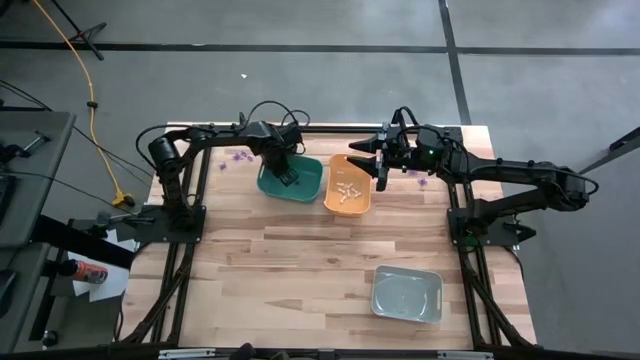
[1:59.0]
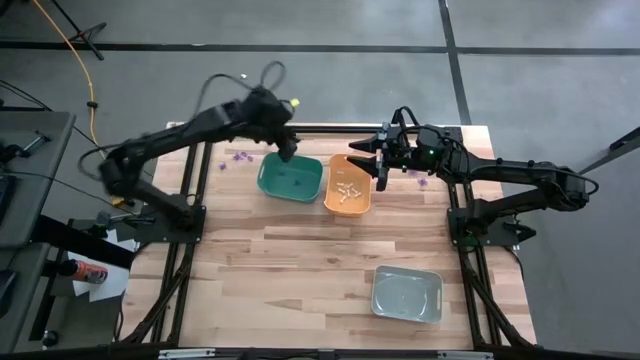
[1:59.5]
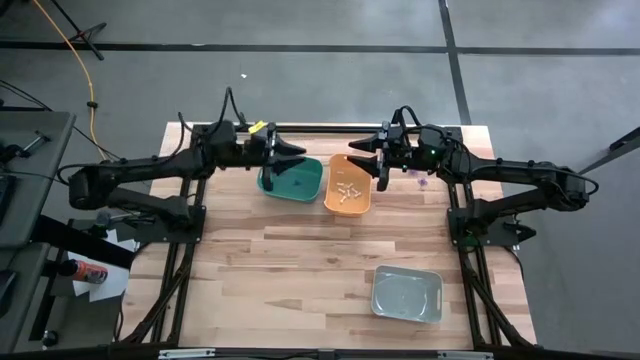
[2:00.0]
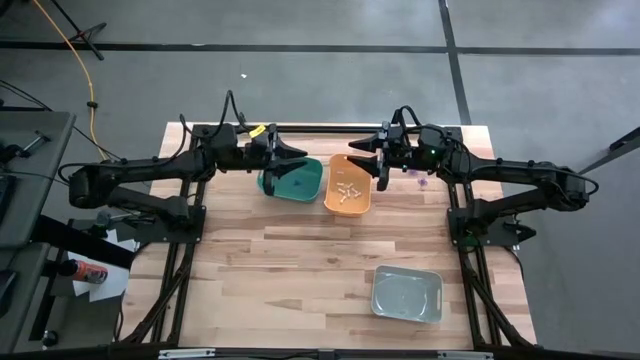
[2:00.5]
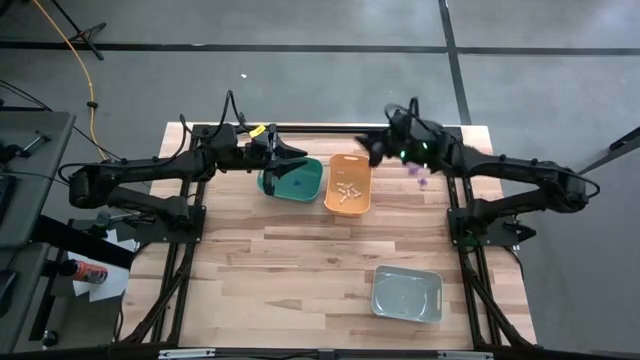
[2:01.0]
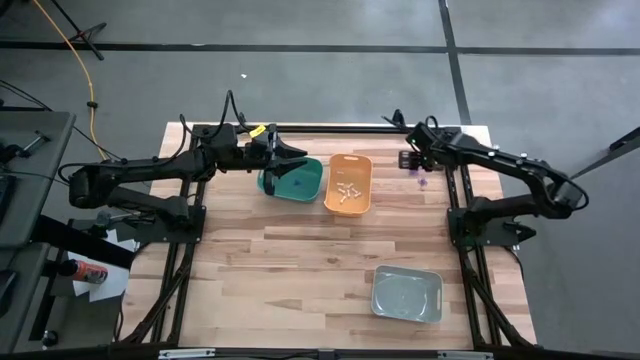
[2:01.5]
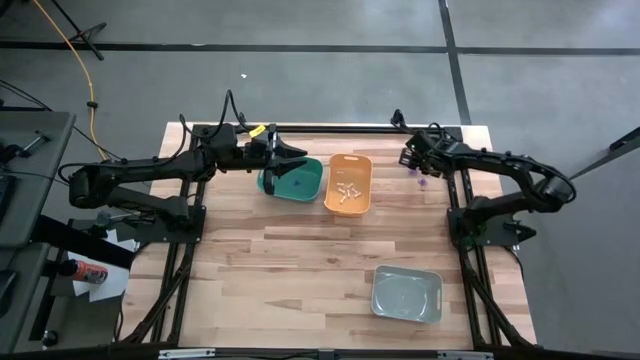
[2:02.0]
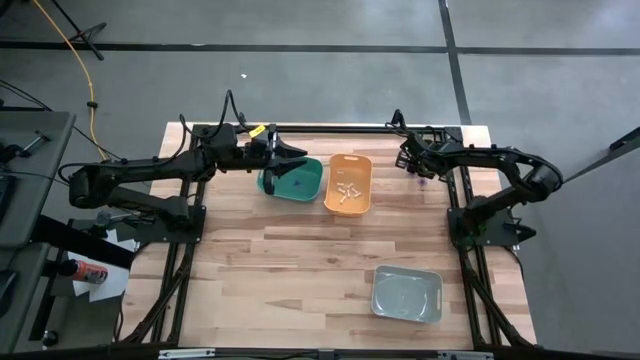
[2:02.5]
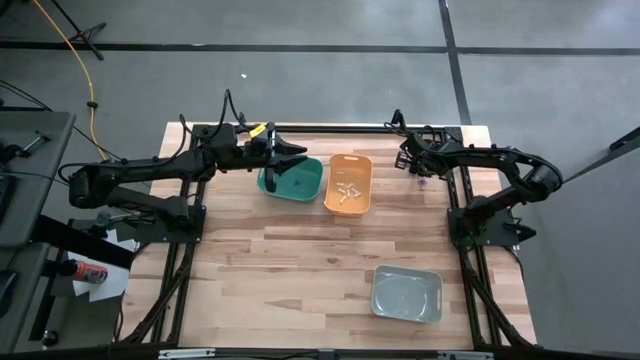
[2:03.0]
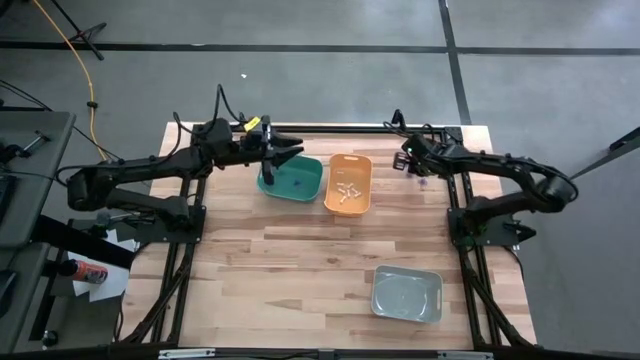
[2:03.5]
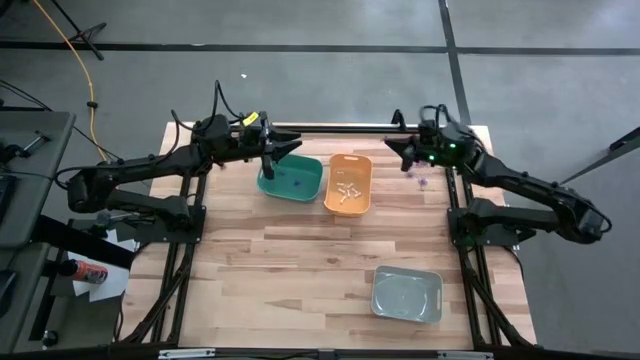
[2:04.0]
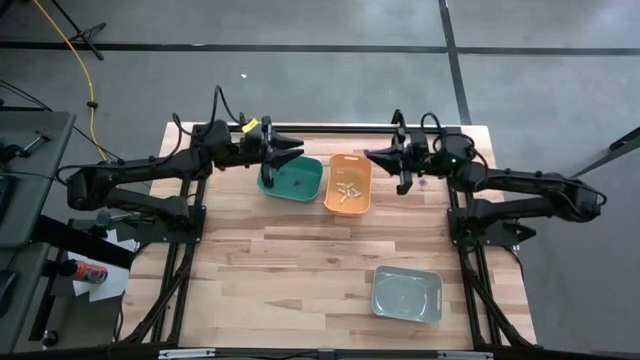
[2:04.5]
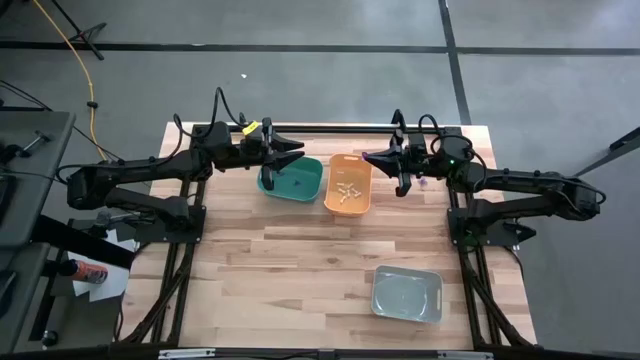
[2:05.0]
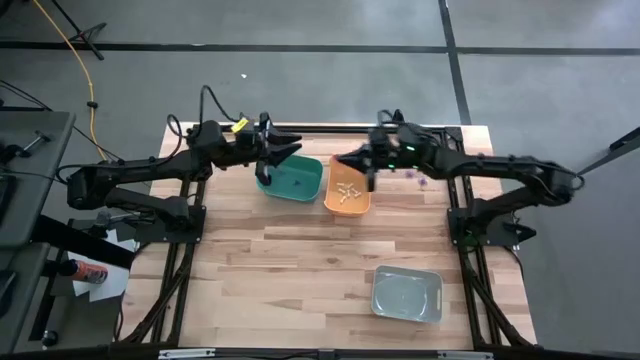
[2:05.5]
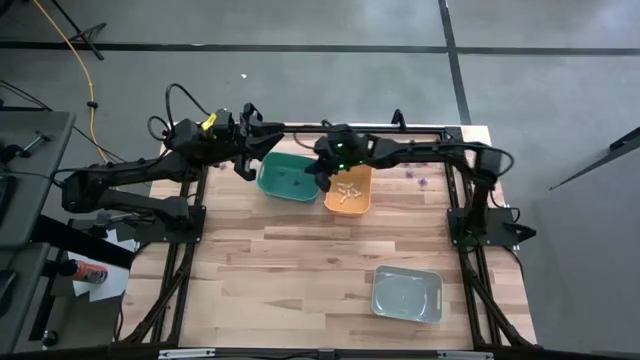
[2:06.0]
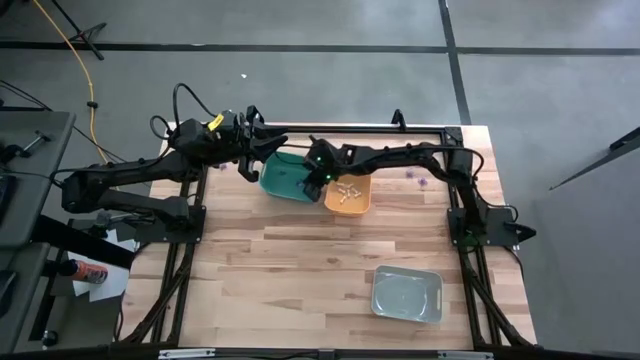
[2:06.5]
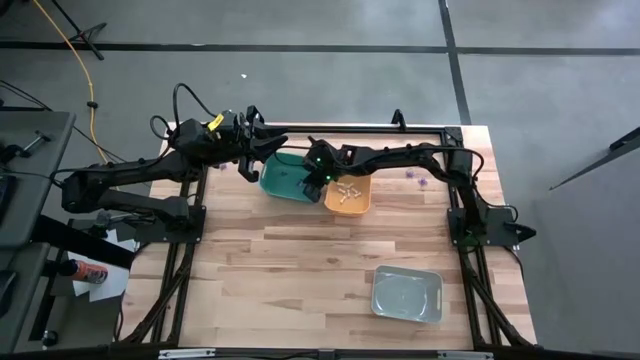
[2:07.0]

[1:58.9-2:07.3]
Task: Sort Halloween decoration
Put the violet witch hut toy into the green bin

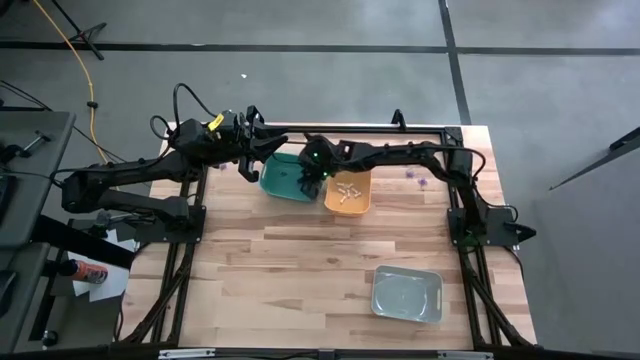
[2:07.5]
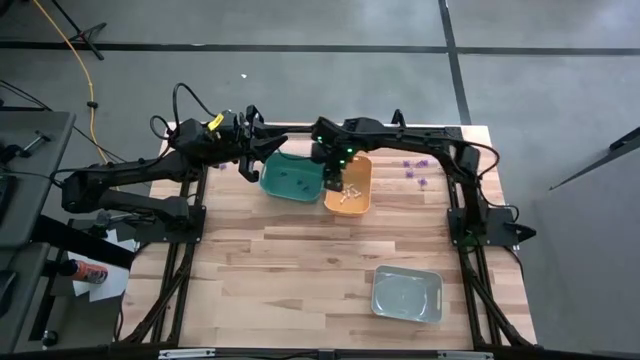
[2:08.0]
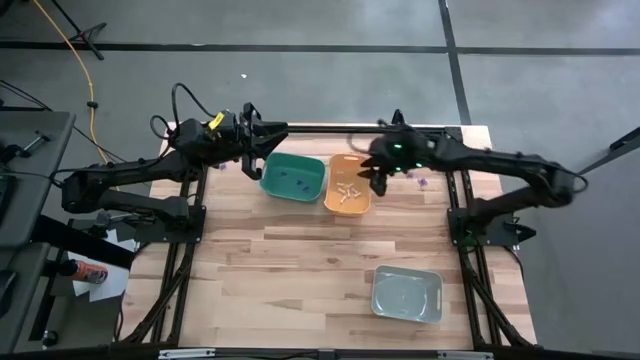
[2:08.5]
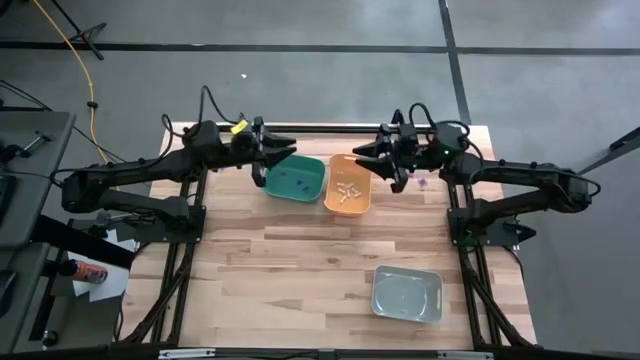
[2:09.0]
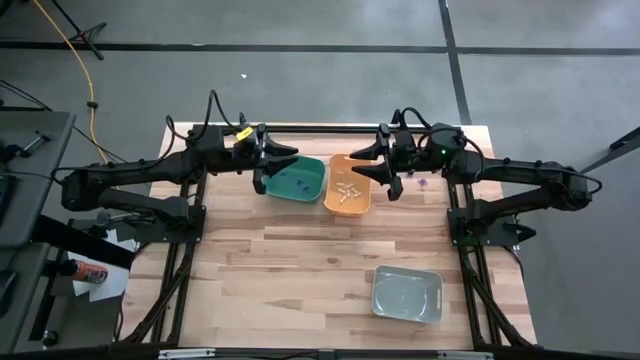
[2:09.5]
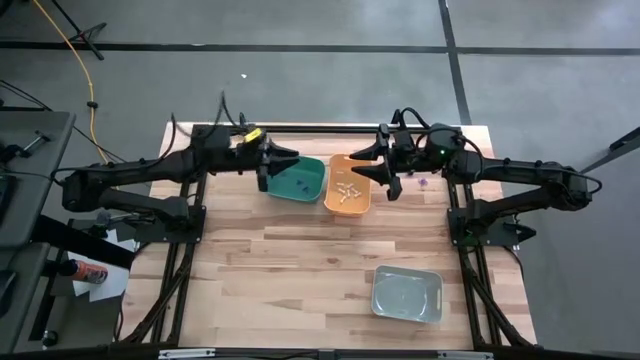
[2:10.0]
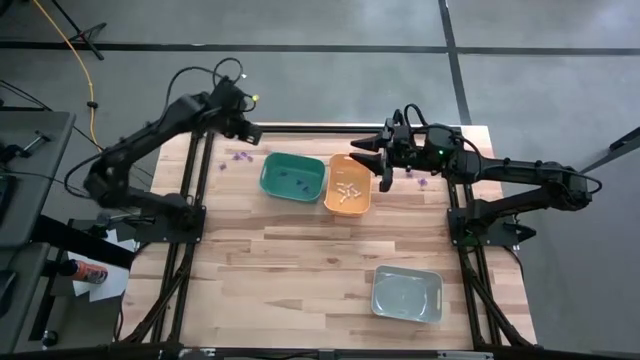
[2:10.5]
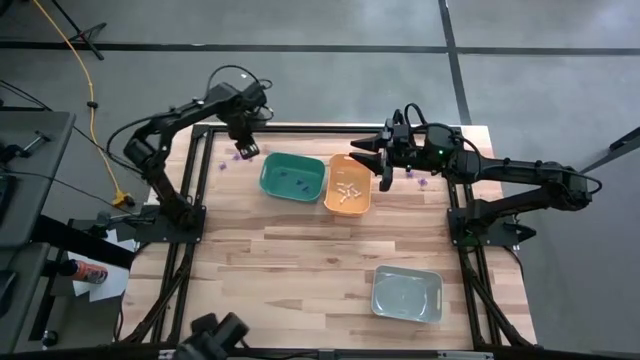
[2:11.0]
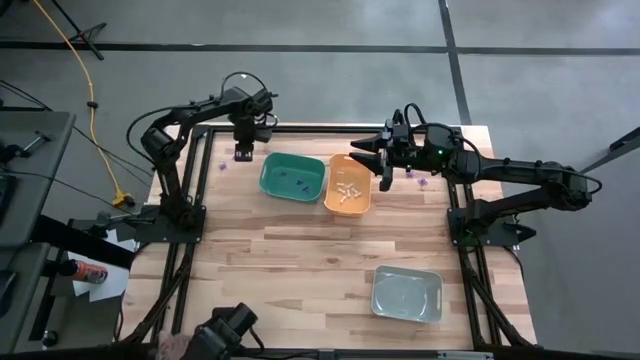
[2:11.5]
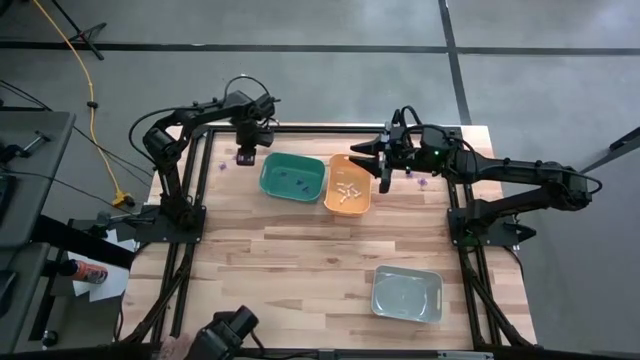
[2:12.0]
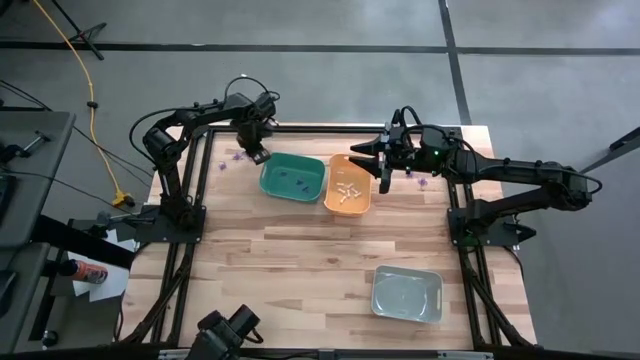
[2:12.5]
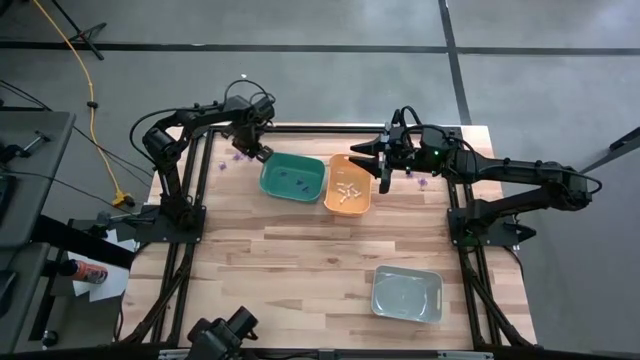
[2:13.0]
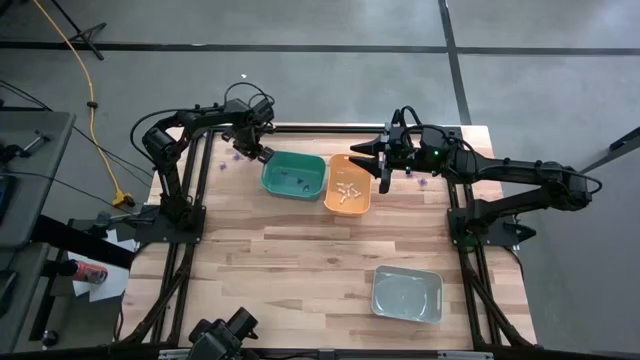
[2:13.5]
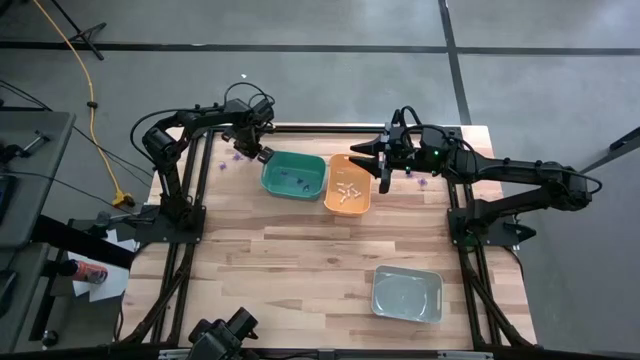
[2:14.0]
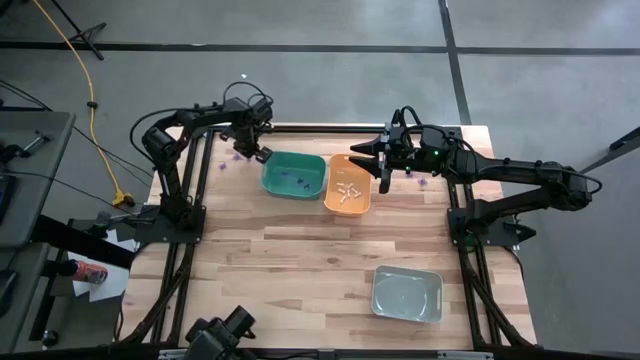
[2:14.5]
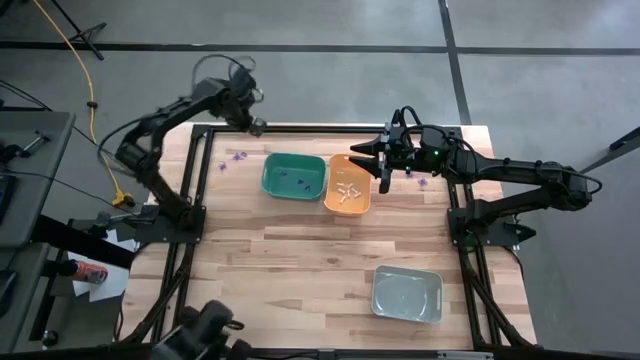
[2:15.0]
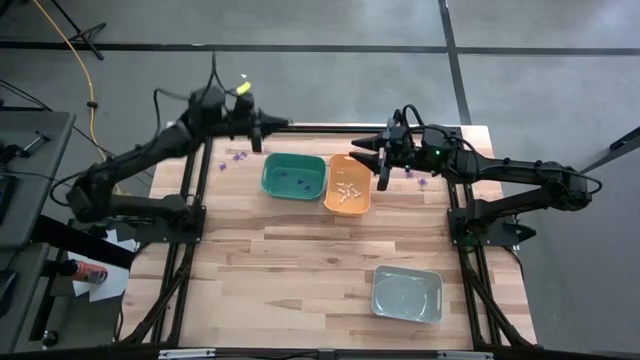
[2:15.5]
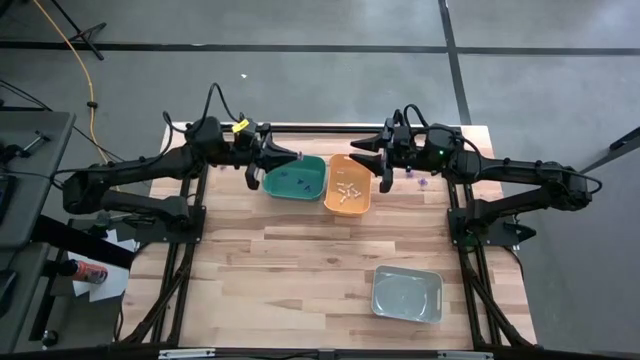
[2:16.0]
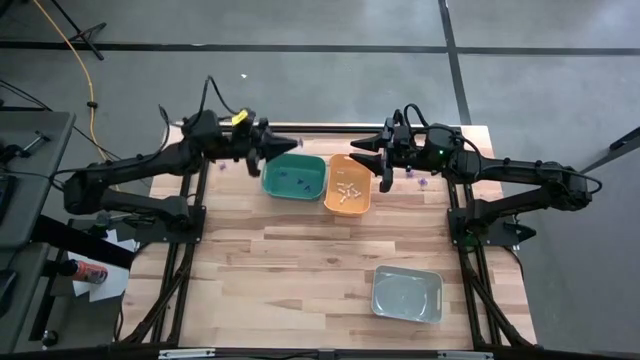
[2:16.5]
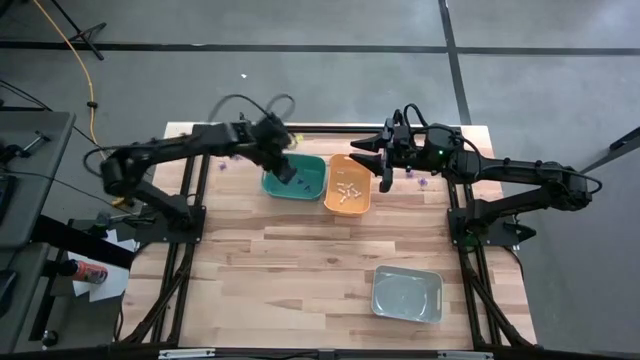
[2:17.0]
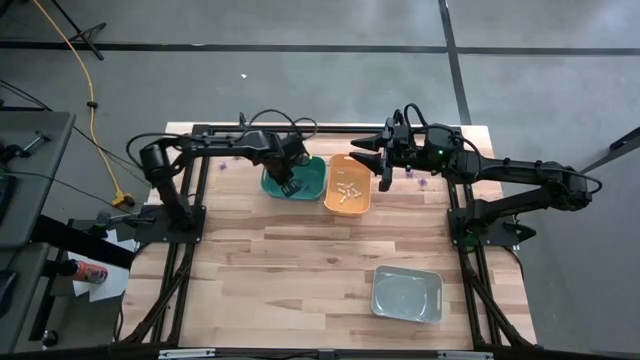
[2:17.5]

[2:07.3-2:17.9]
Put the violet witch hut toy into the green bin

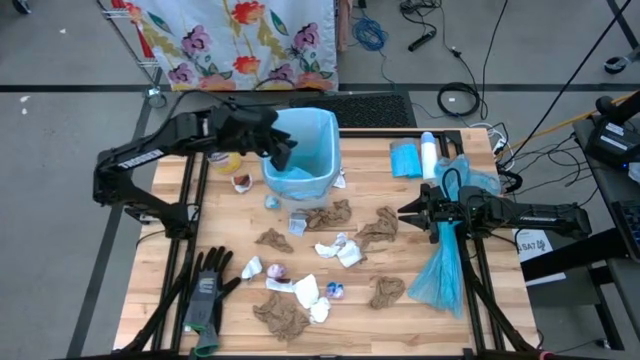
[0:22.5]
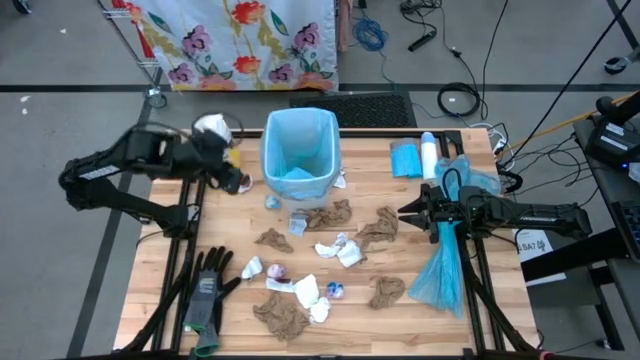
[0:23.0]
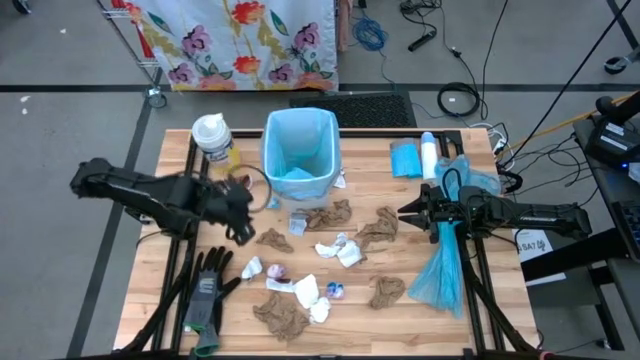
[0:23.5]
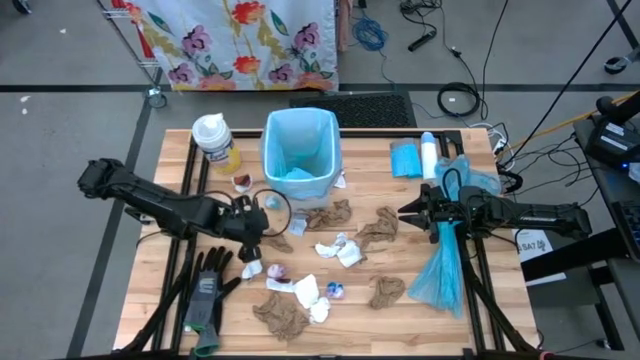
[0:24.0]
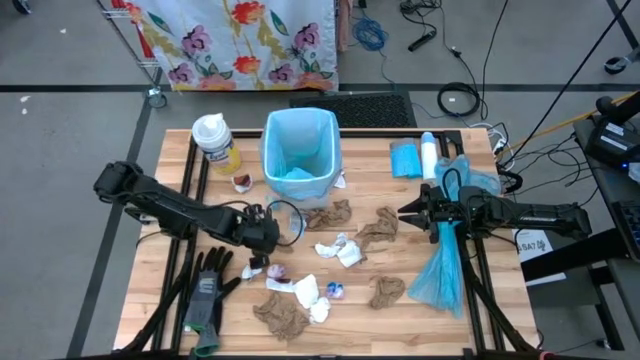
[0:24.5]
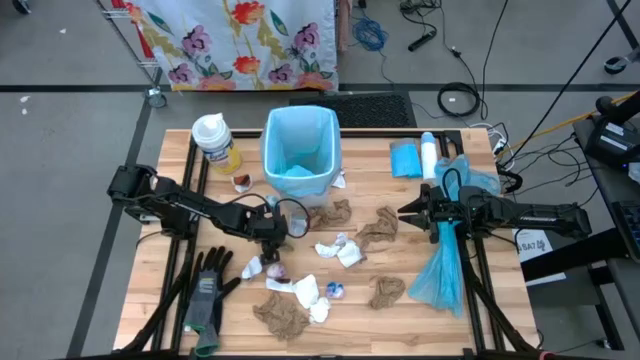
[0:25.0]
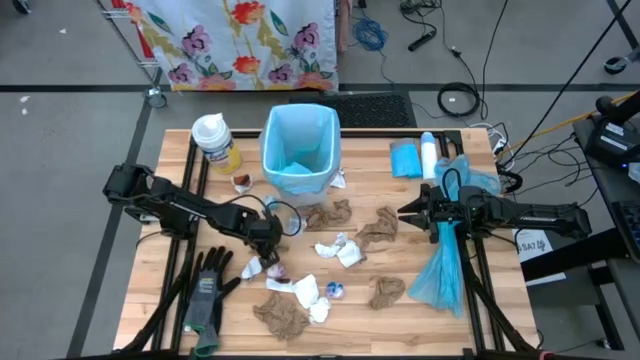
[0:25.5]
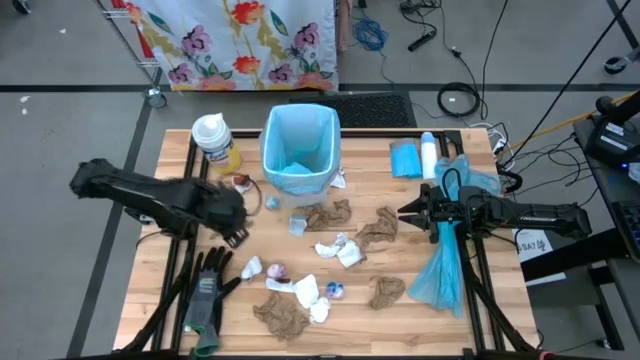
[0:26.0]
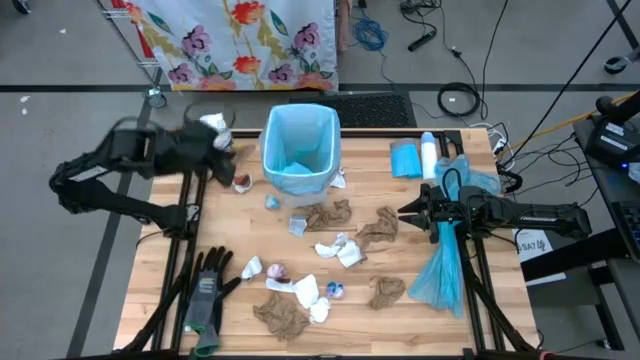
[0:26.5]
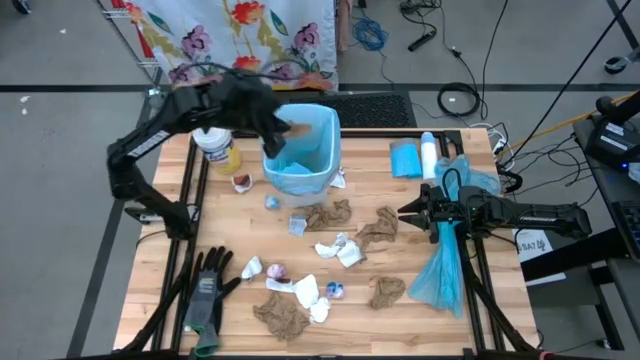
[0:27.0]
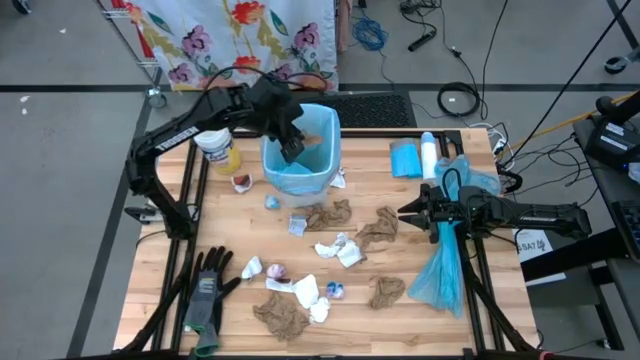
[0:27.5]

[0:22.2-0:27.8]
Task: place trash/remove bag and relplace
Put the brown napkin into the trash bin
